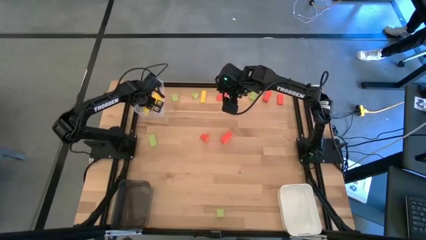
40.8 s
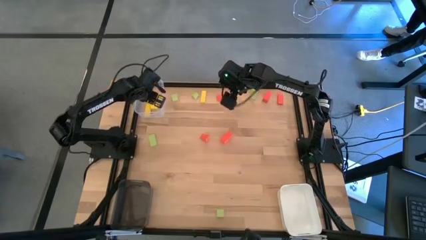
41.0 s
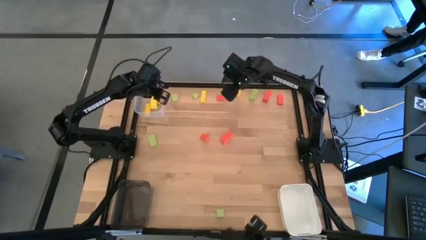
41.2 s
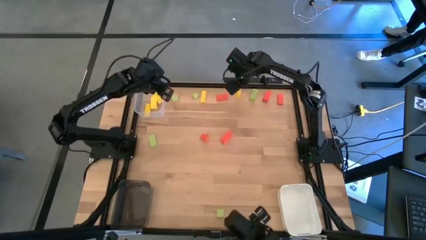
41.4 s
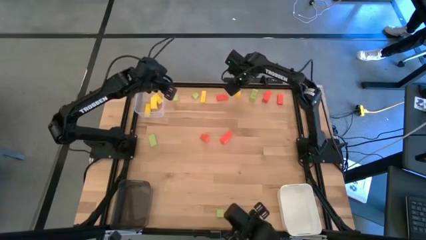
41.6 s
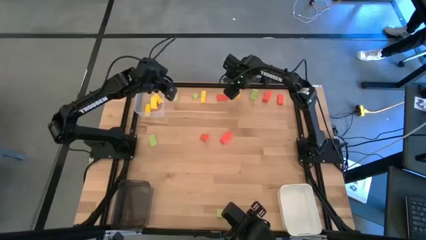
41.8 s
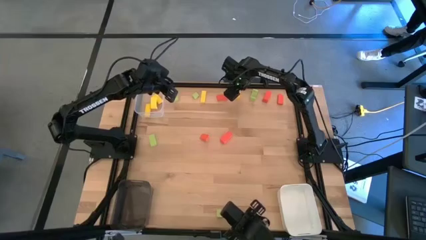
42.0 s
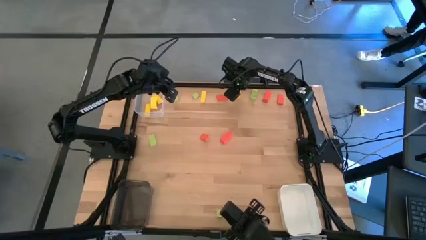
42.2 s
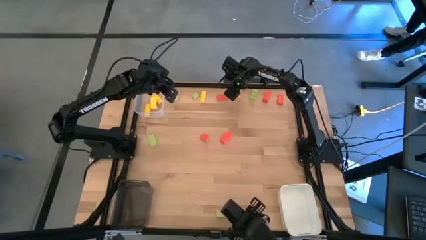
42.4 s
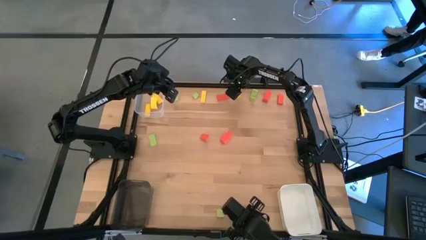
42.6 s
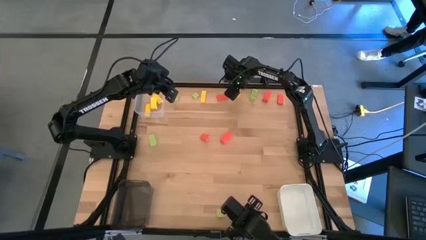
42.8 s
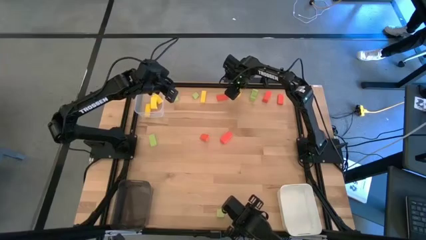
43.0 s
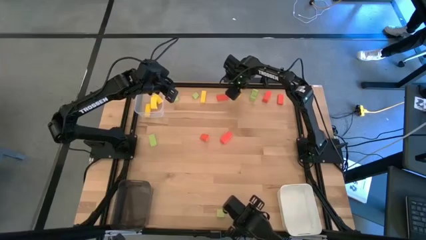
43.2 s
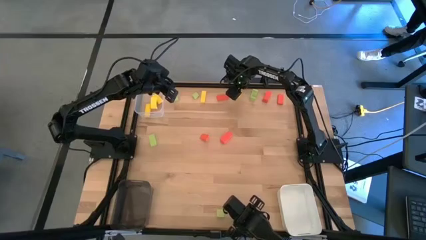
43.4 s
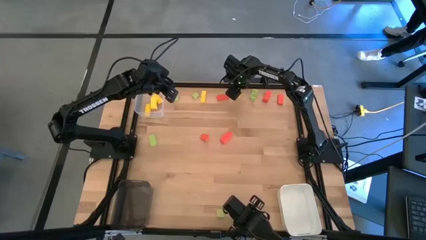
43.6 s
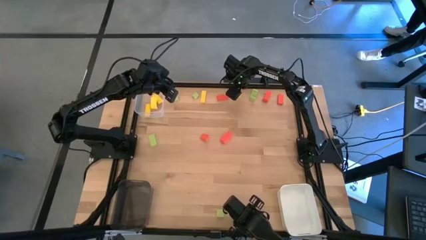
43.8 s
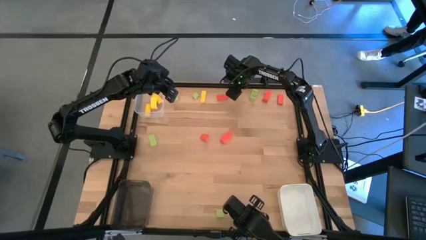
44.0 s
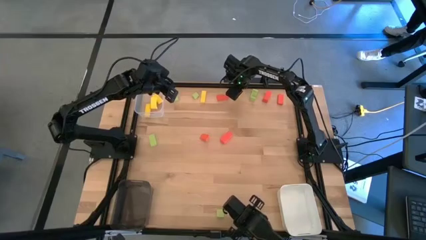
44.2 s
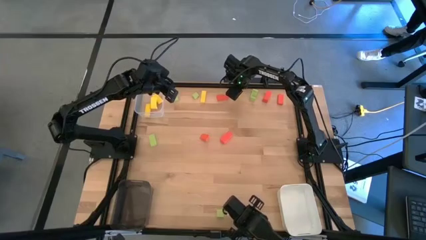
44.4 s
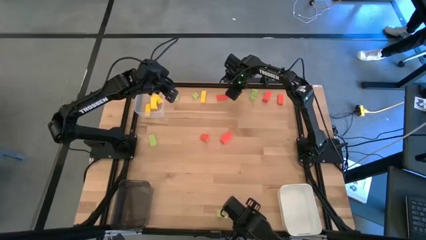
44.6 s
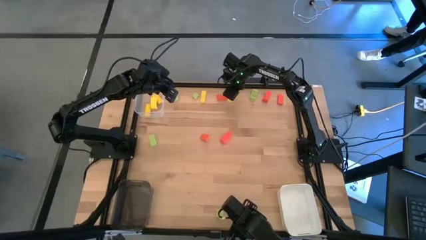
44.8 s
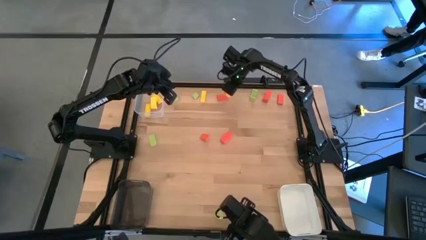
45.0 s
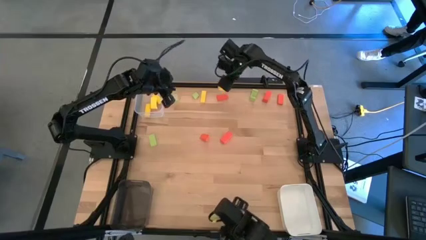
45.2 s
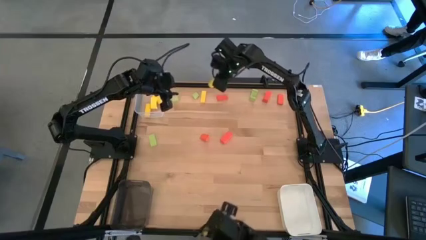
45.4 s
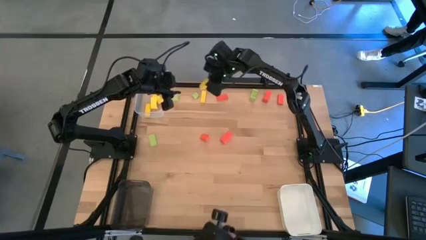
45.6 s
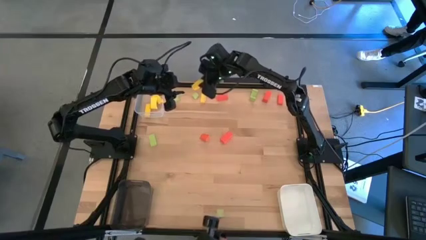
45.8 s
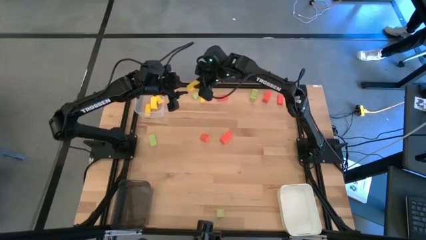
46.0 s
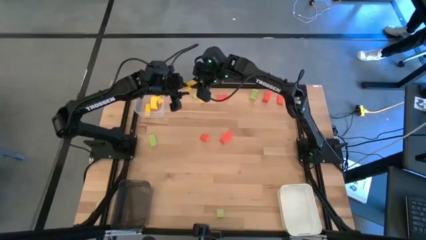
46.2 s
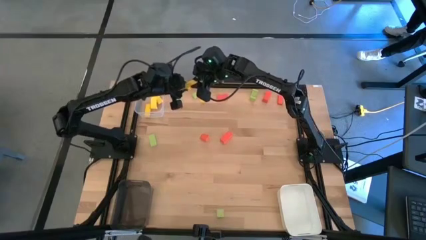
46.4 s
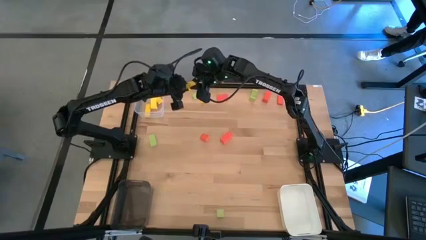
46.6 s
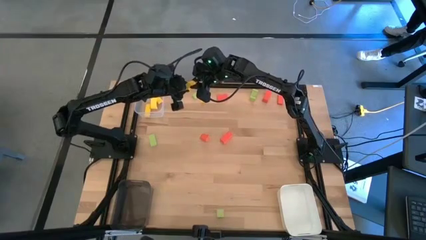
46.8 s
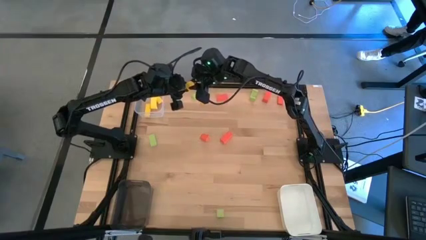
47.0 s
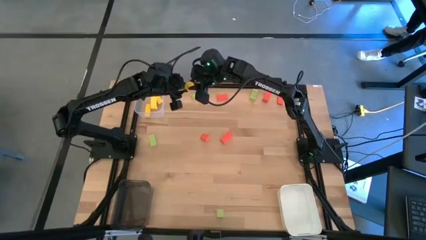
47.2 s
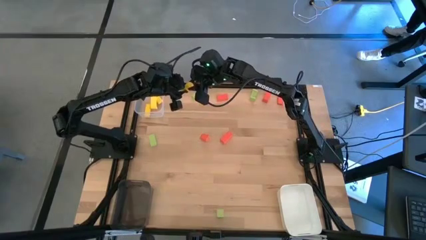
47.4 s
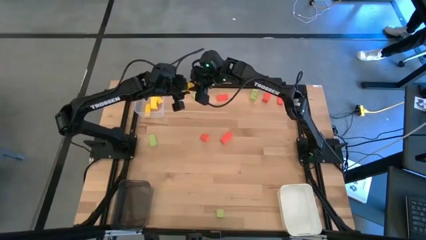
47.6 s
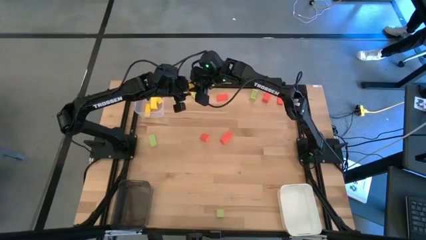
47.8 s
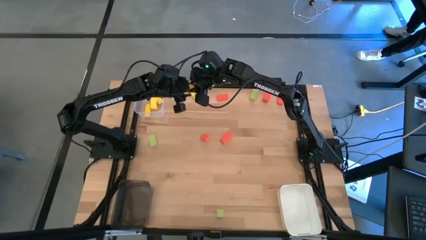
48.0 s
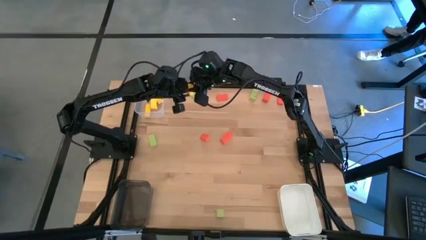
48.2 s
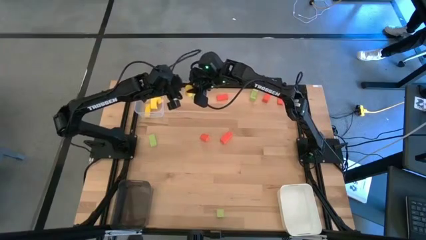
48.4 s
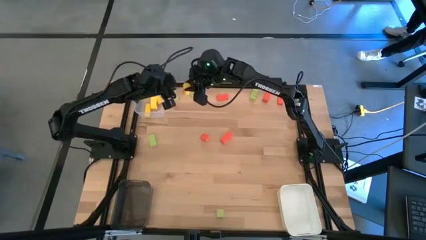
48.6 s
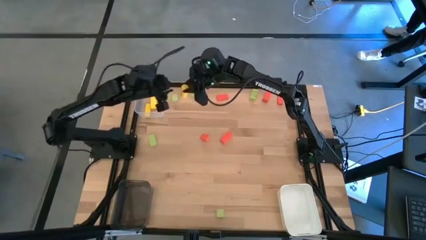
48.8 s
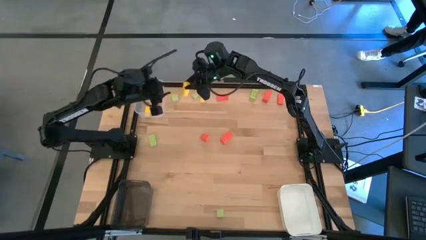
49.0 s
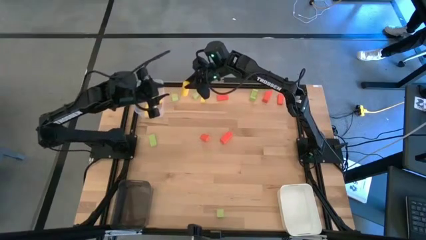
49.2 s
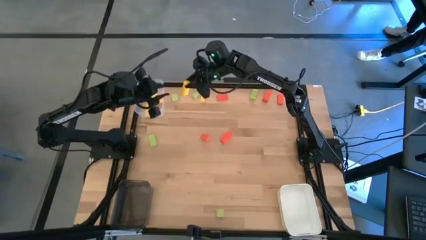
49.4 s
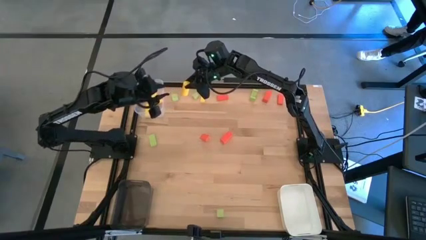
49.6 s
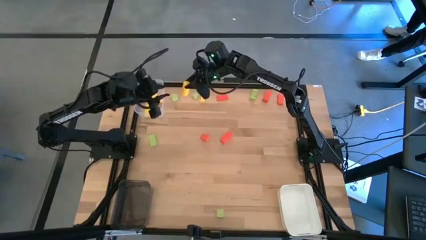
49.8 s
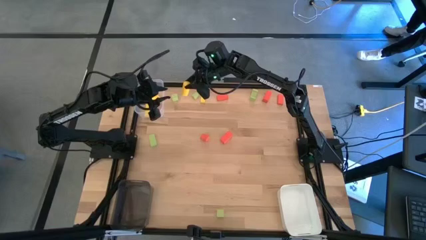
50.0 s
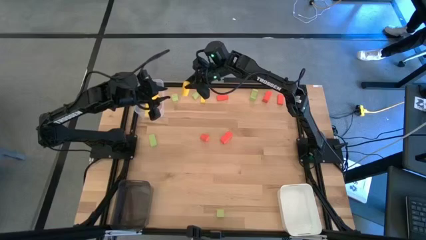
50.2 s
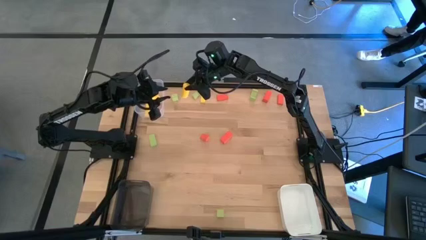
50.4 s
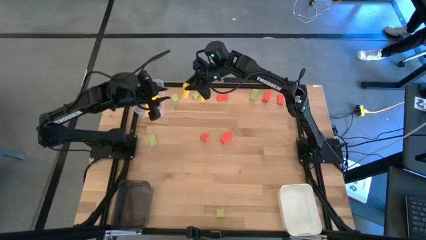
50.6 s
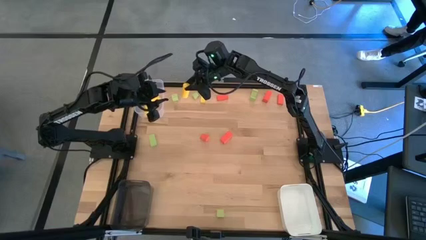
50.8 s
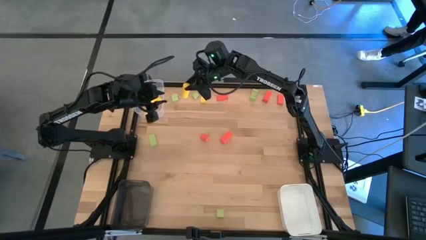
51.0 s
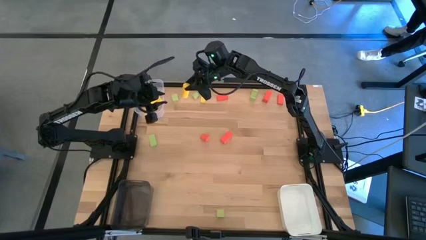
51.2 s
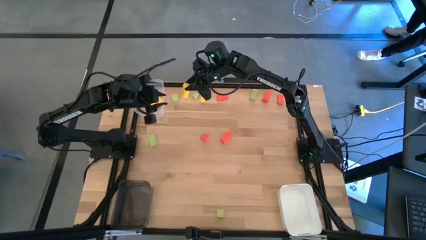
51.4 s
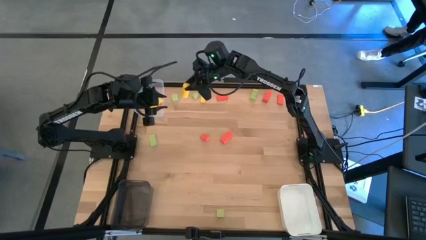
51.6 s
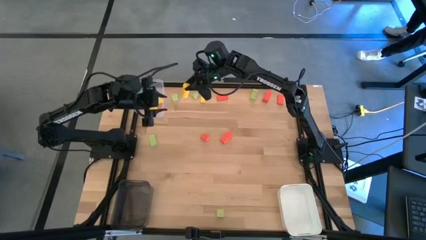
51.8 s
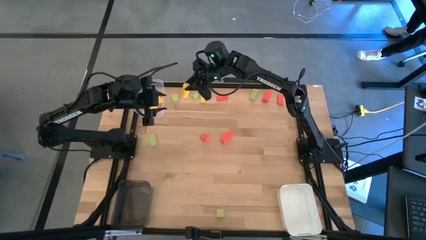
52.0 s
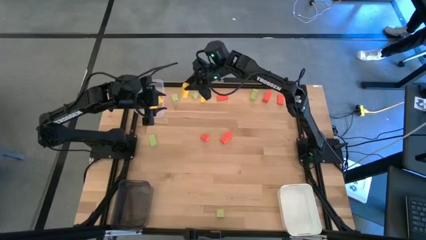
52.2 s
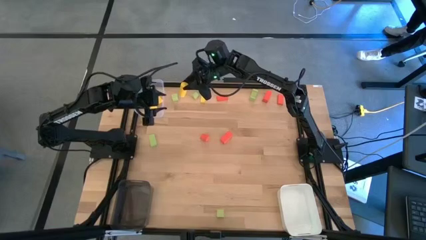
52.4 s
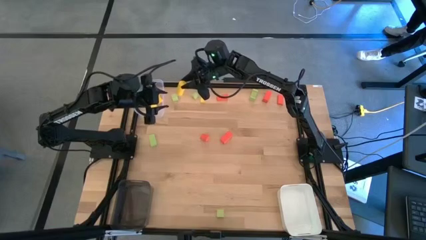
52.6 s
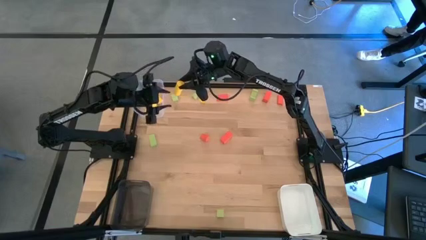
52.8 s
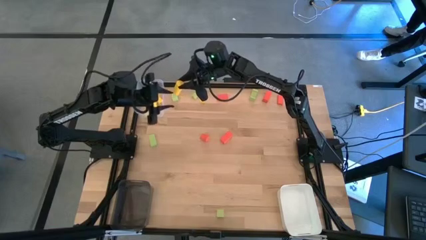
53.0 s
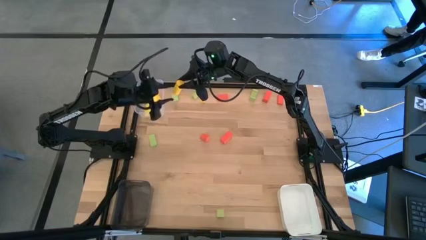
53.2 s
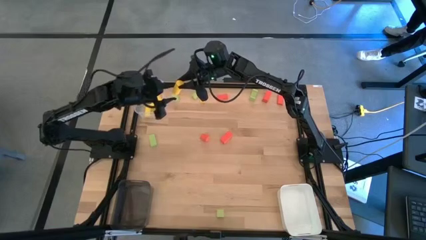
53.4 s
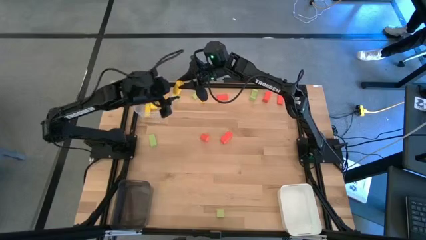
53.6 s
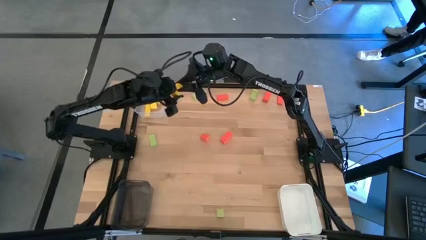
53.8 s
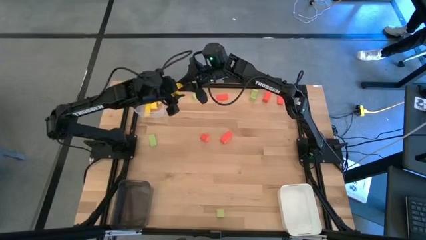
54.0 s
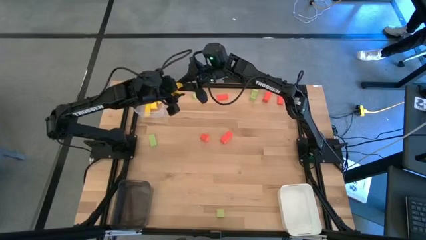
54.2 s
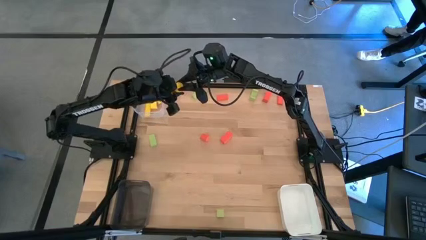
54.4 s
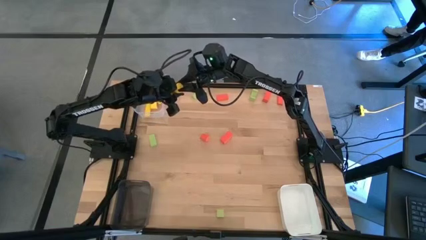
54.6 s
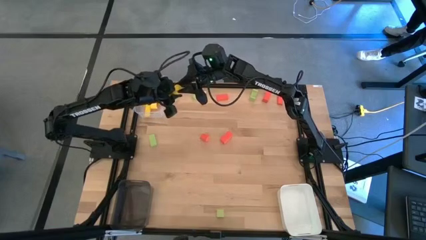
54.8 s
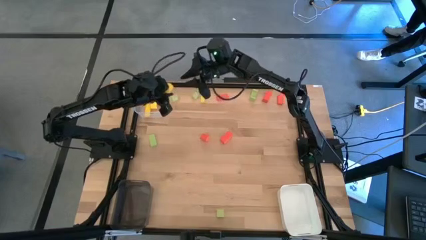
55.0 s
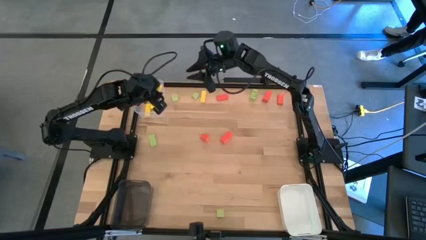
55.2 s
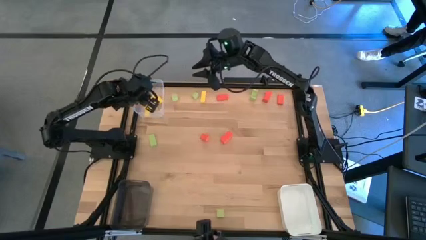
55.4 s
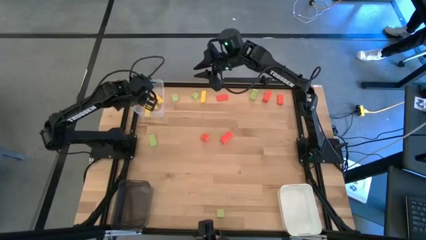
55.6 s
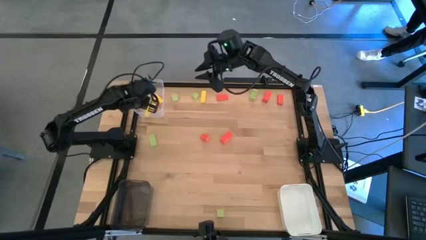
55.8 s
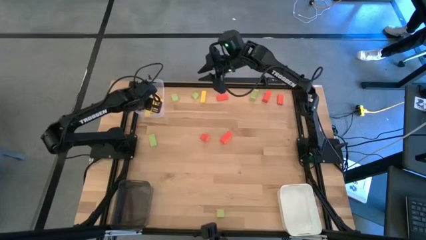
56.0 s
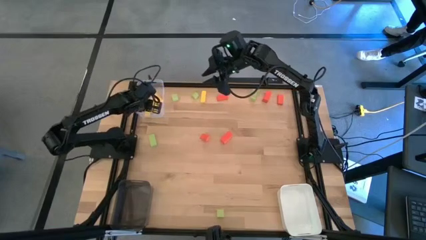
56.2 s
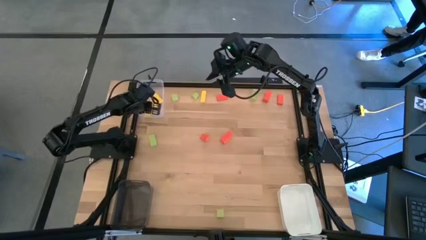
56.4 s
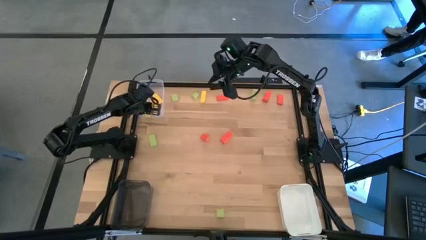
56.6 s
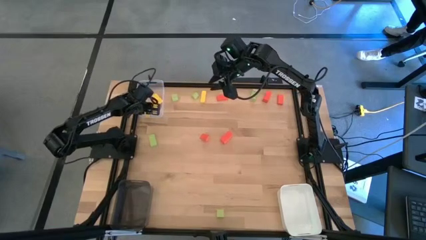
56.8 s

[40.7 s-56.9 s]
Task: Sort & place blocks by color
Put the yellow block into the transparent bin
